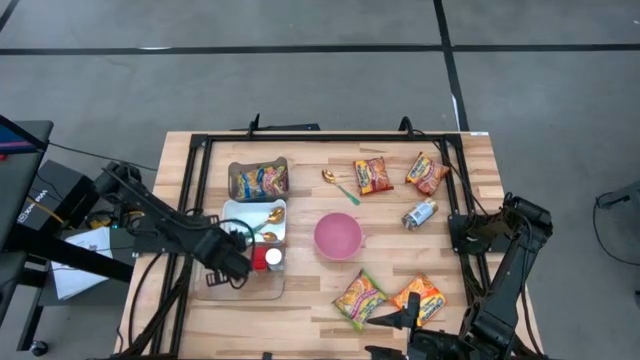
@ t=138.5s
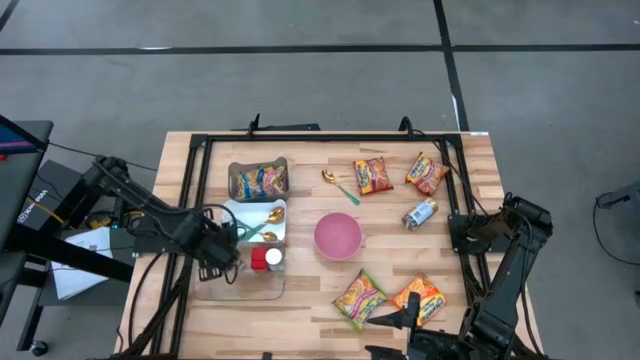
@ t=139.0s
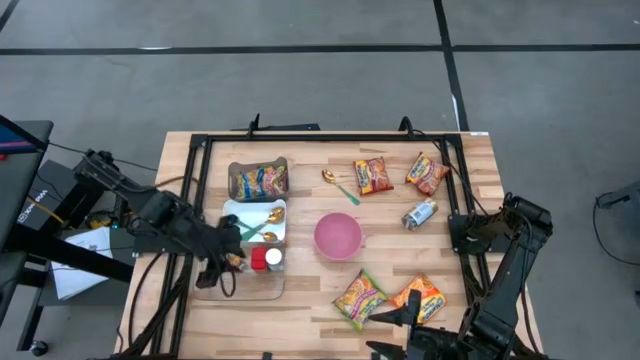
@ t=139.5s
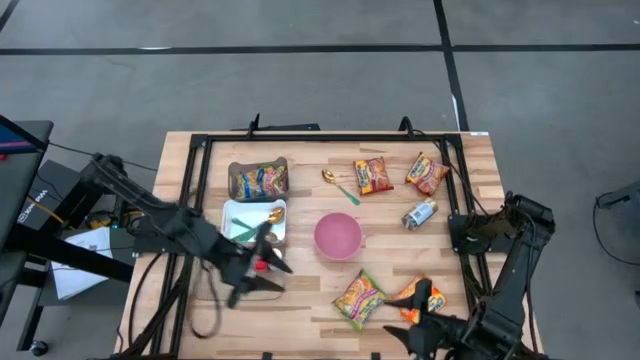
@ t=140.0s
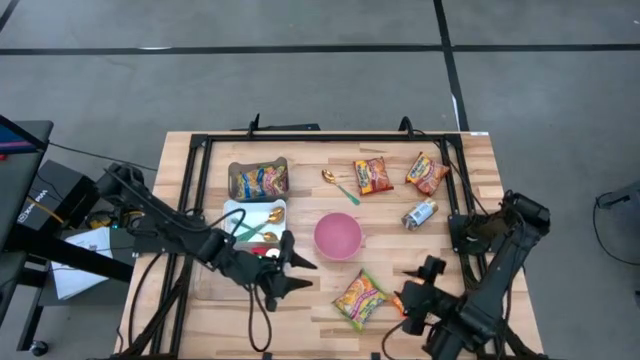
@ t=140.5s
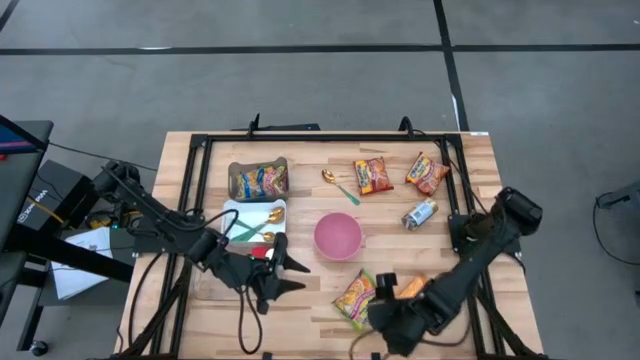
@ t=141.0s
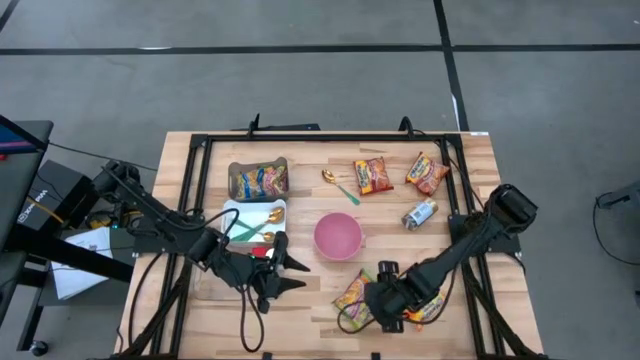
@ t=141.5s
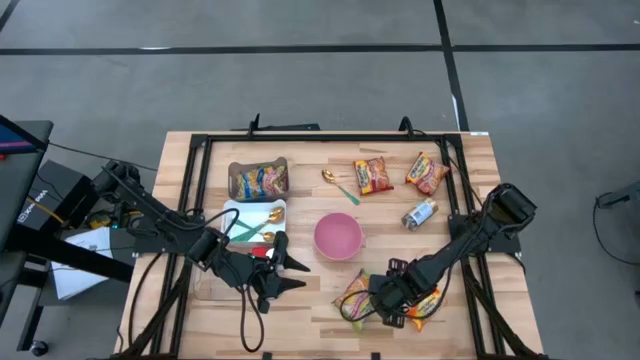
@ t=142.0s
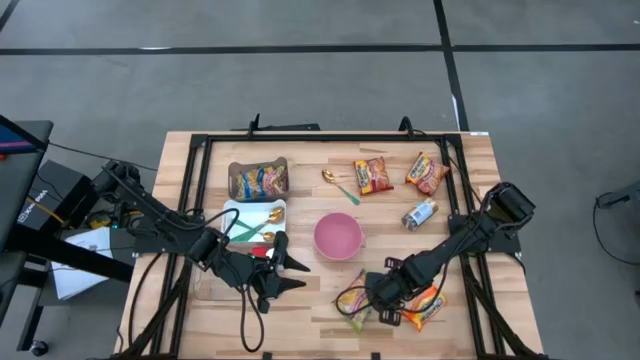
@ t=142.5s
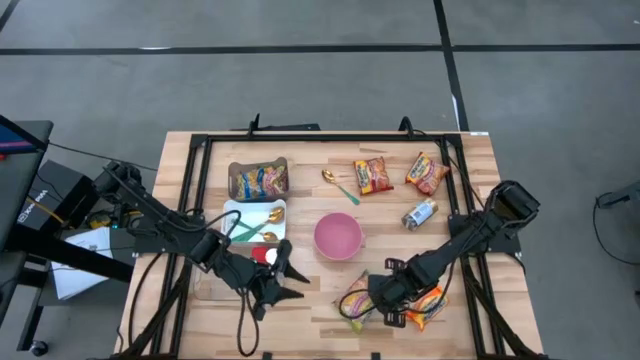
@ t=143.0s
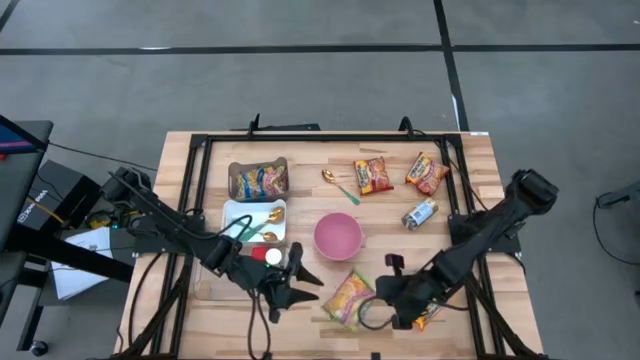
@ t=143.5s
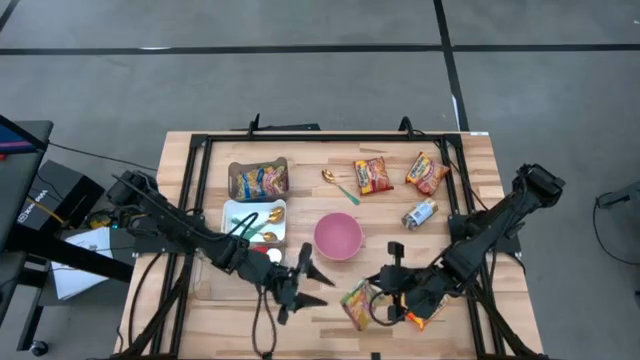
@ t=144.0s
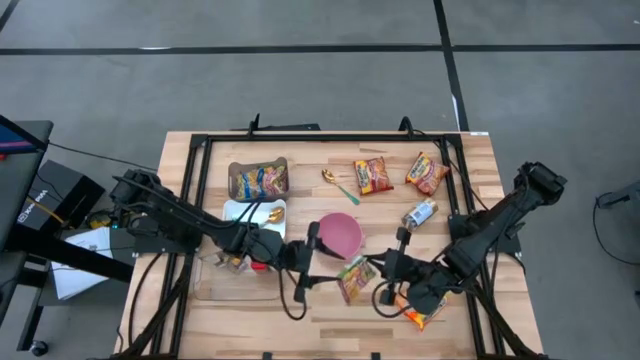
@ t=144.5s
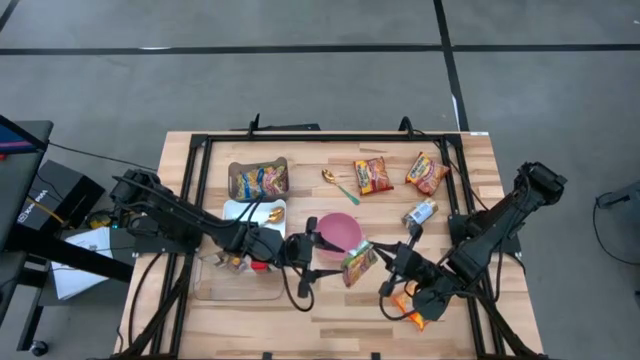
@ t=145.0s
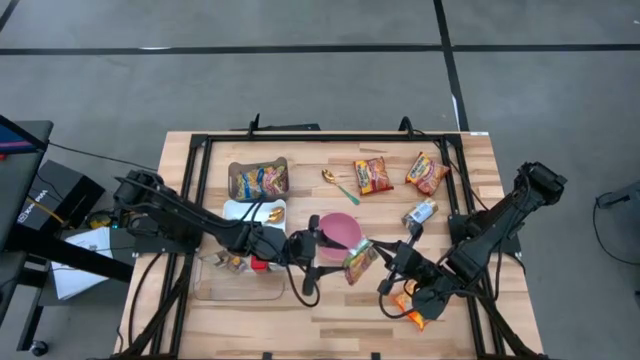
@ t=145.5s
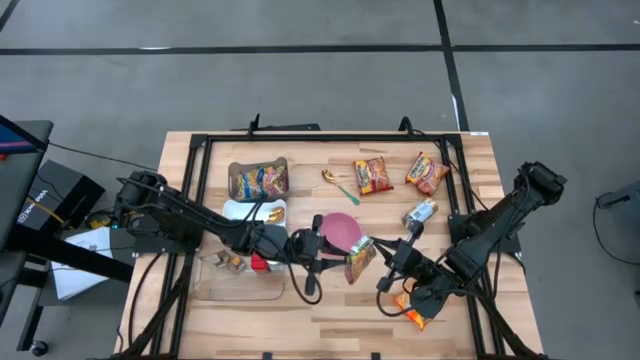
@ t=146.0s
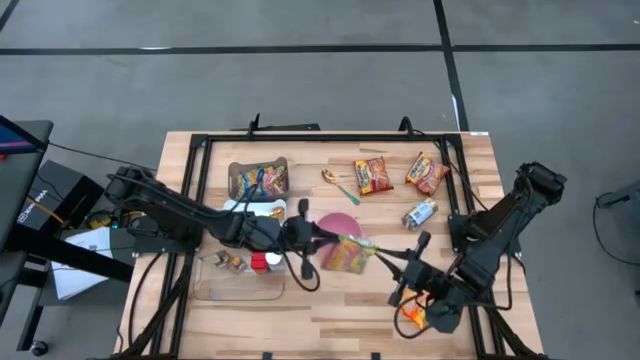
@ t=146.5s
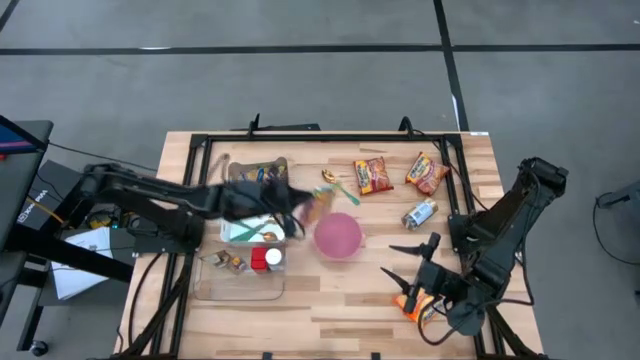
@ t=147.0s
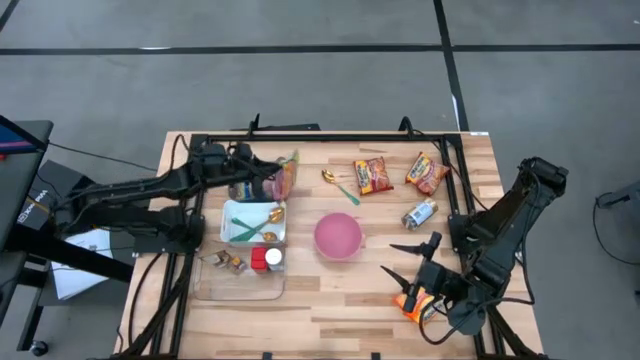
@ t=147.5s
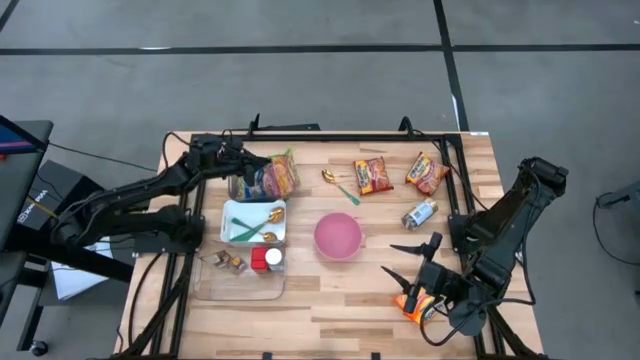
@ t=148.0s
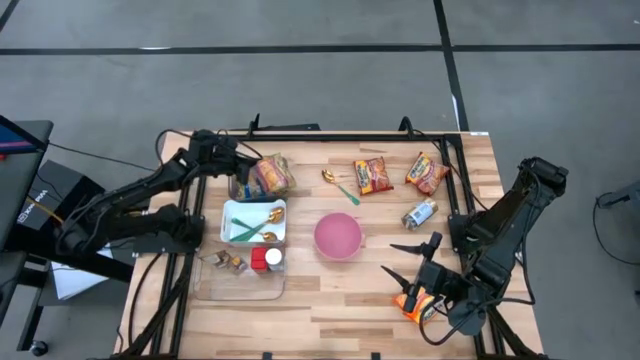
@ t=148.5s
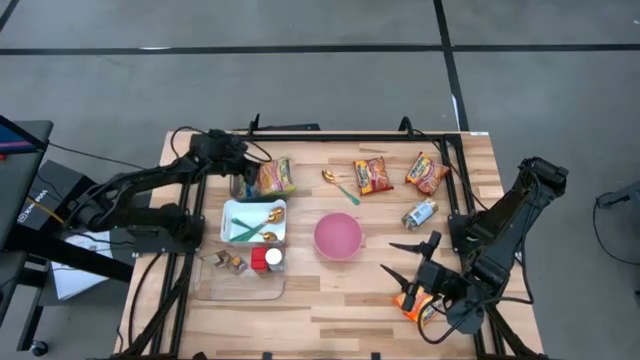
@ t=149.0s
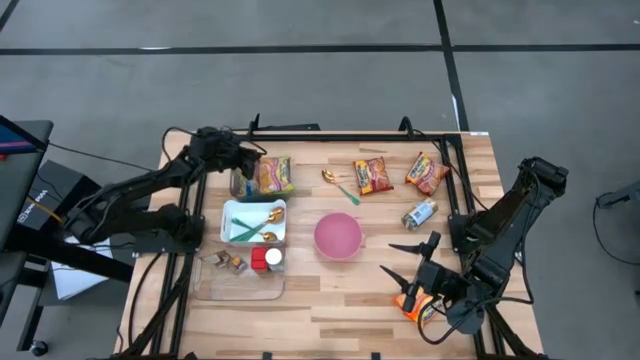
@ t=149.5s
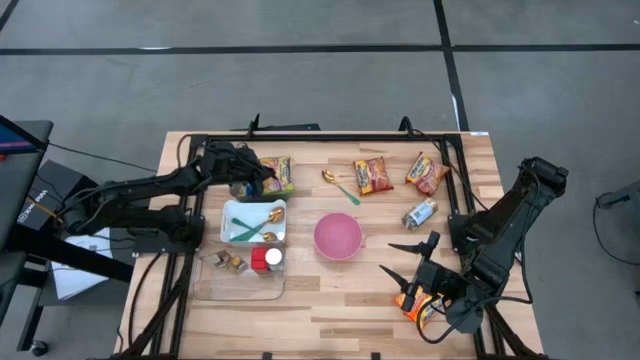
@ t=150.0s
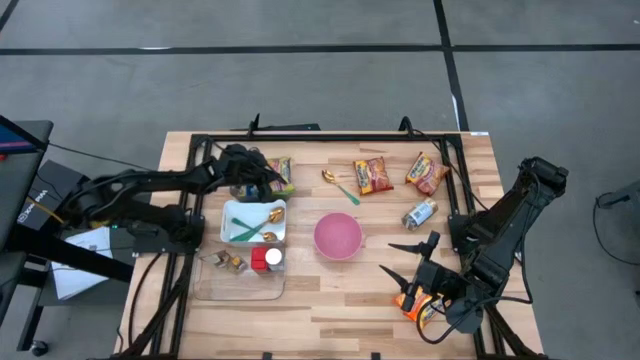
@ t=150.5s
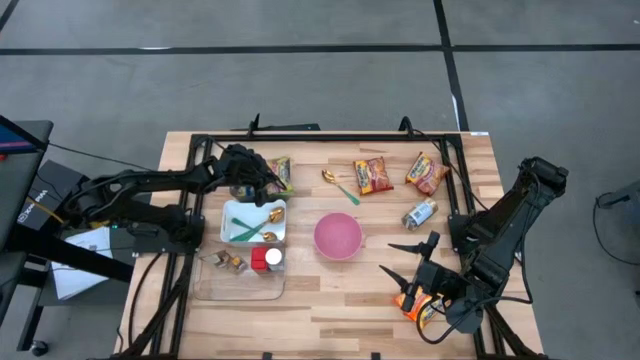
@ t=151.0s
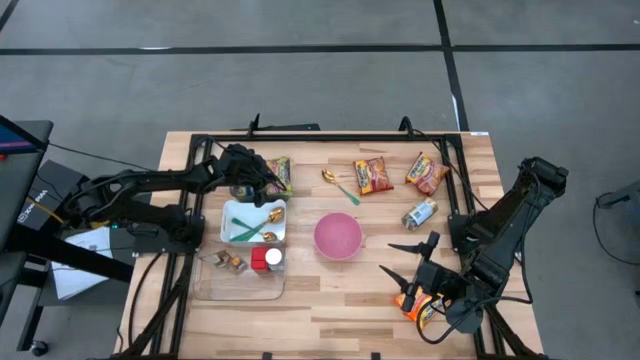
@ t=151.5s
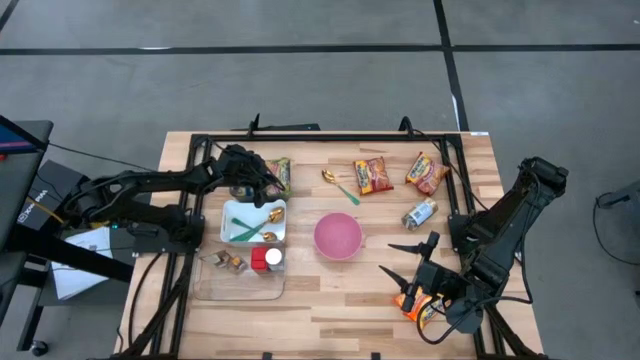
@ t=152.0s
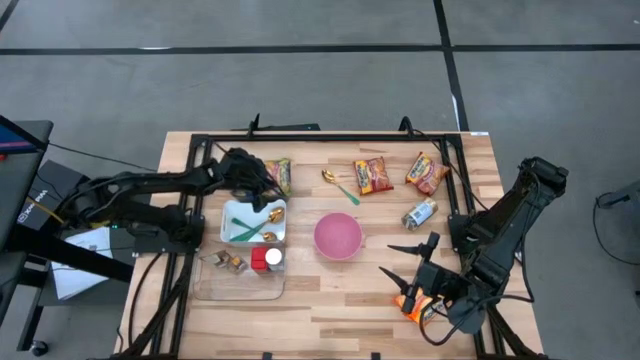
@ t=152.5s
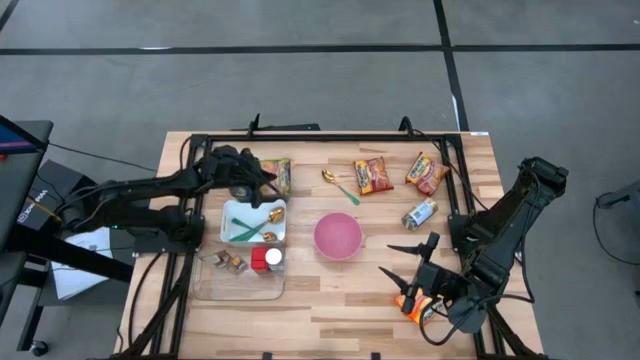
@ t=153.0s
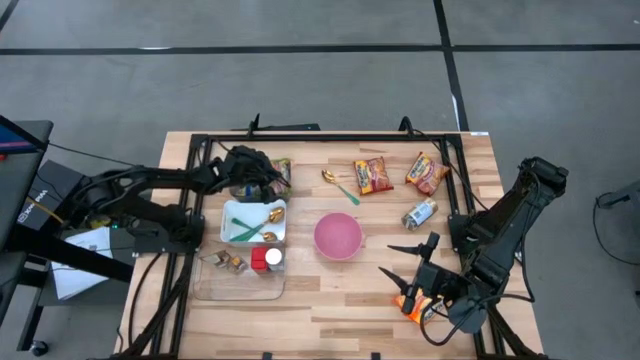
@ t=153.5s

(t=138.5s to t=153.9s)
Task: Pick & Place Food Item
Put the green noodle pack into the black transparent bin

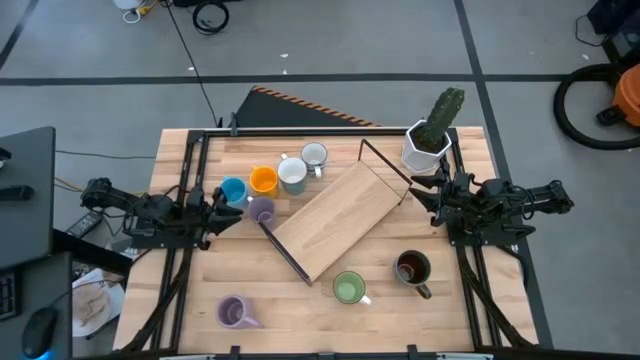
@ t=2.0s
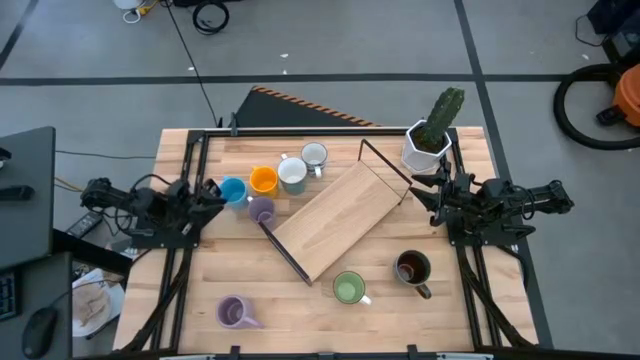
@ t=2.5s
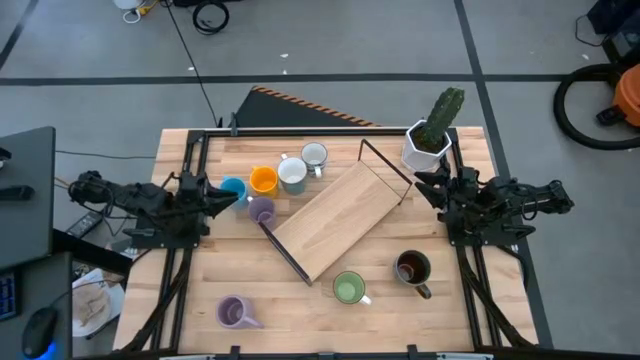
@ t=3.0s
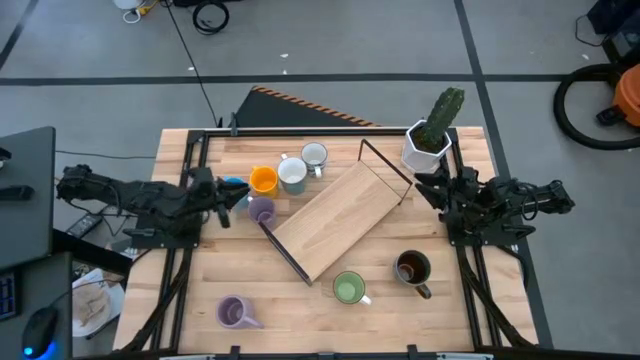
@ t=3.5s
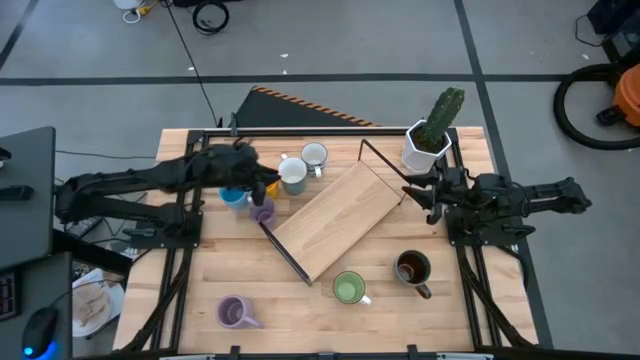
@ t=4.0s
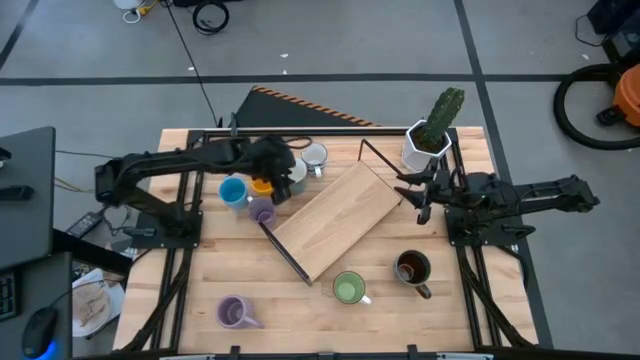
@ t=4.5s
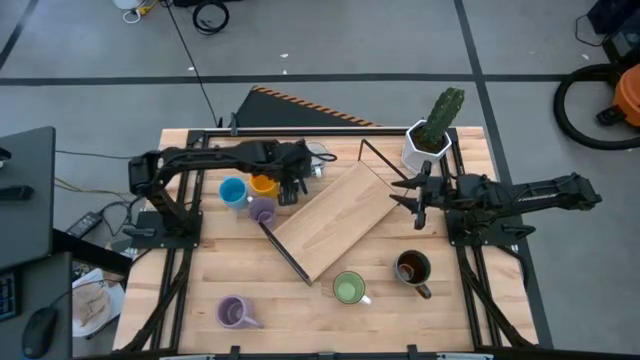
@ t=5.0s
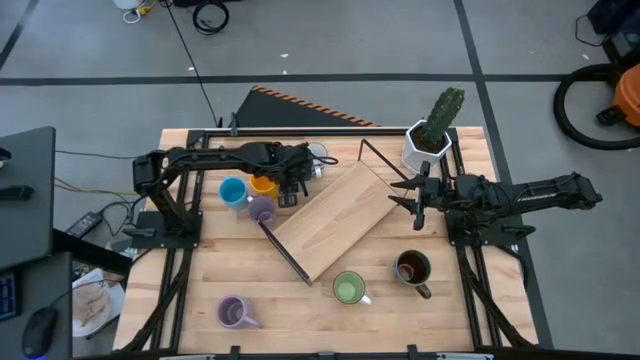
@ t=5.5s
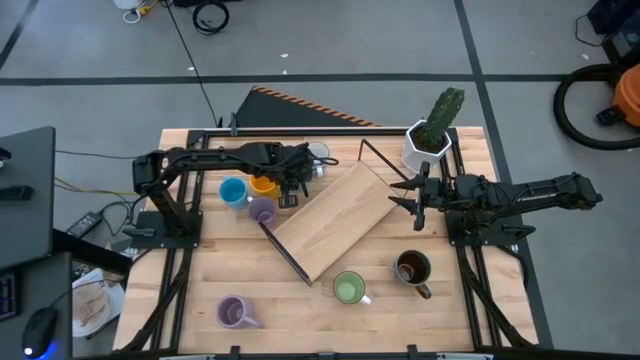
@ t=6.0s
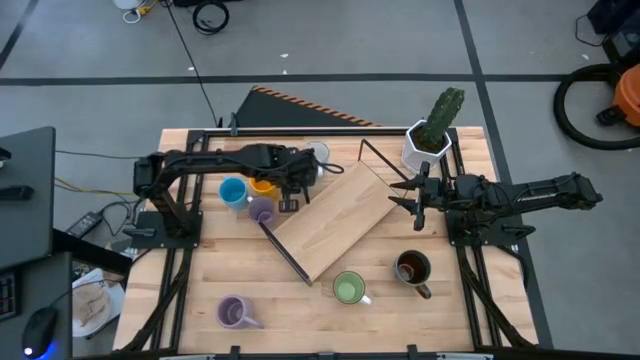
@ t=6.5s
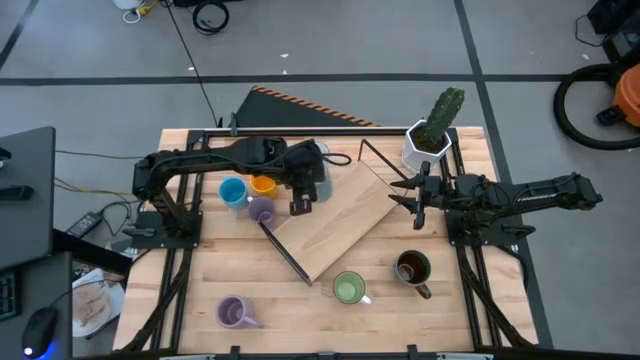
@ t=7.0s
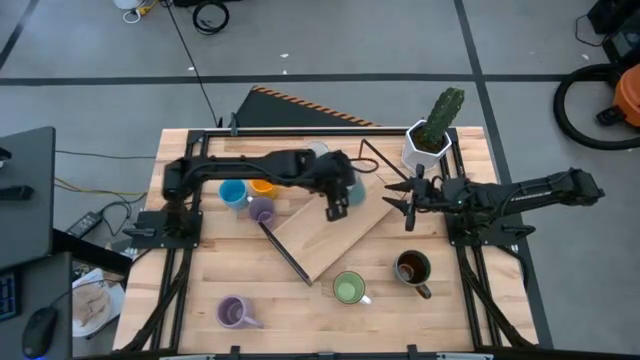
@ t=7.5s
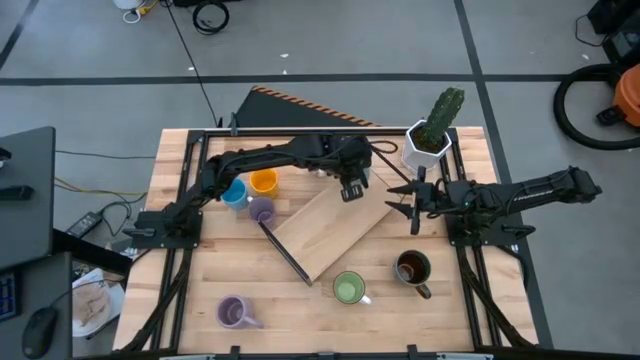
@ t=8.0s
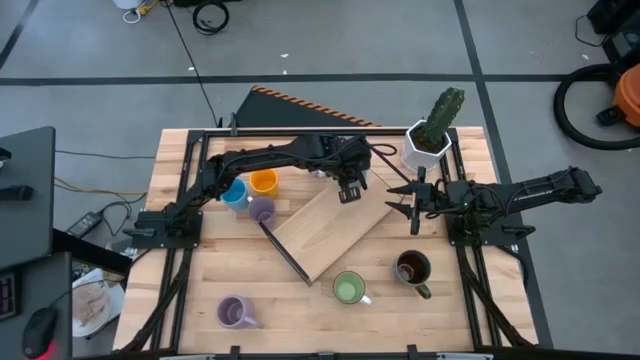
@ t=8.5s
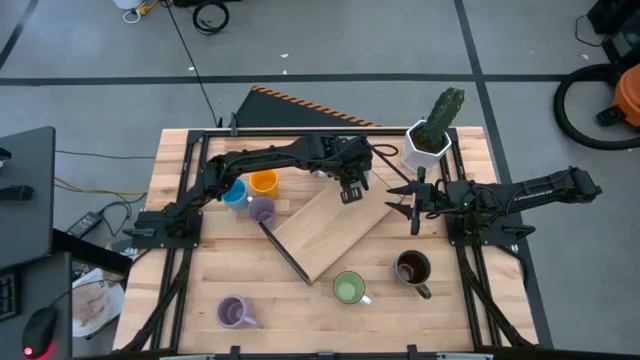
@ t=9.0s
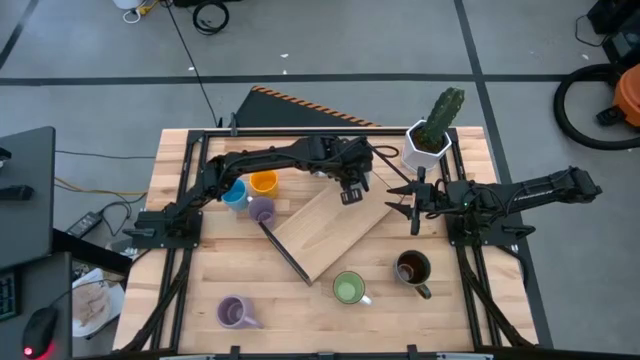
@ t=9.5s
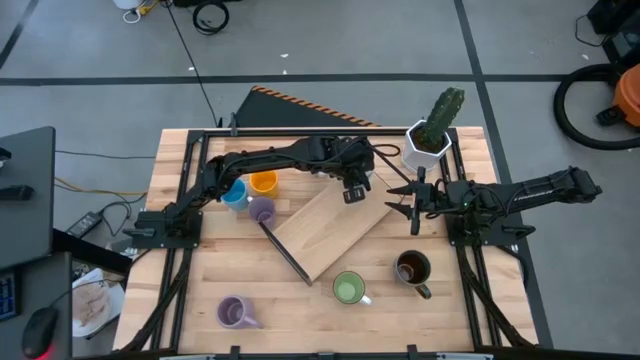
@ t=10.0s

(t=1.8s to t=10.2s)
Task: Place coffee mugs
Put the blue mug on the shelf
